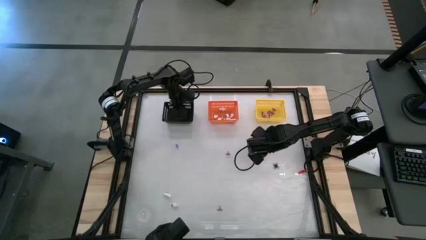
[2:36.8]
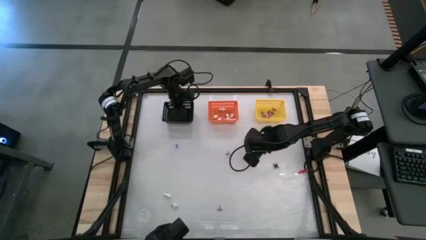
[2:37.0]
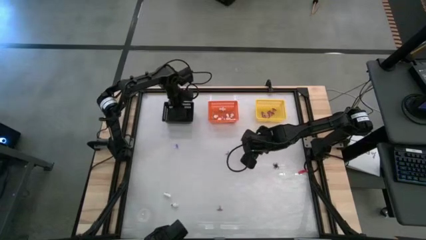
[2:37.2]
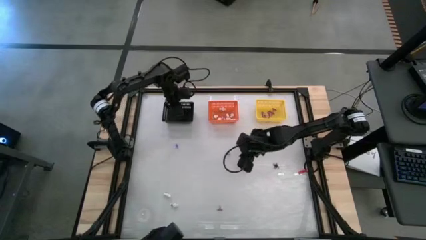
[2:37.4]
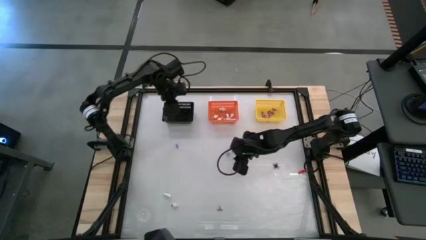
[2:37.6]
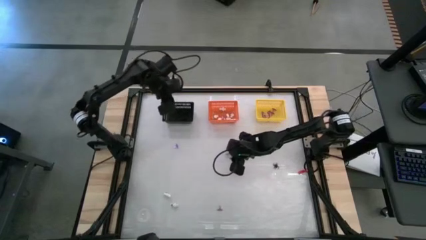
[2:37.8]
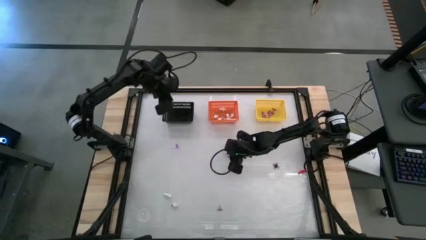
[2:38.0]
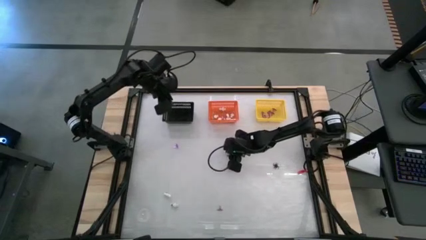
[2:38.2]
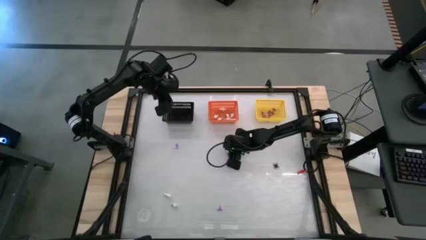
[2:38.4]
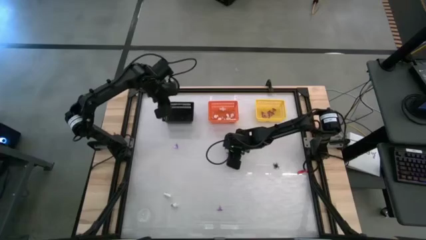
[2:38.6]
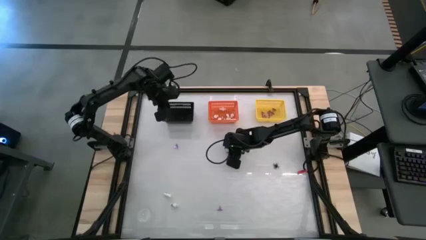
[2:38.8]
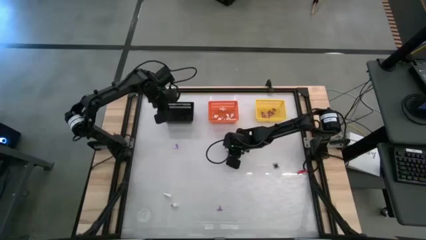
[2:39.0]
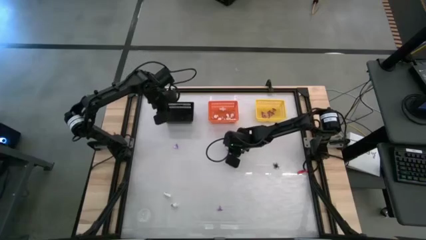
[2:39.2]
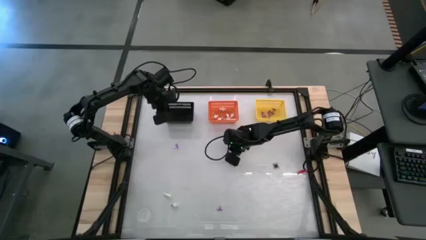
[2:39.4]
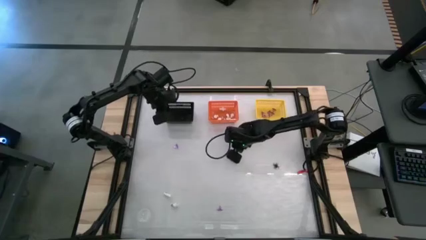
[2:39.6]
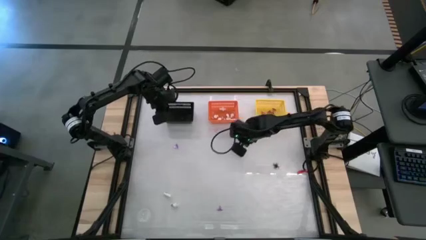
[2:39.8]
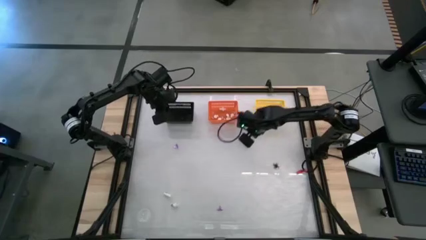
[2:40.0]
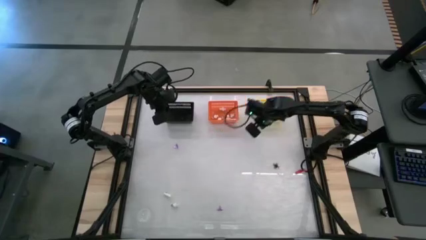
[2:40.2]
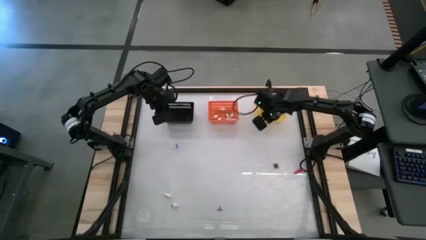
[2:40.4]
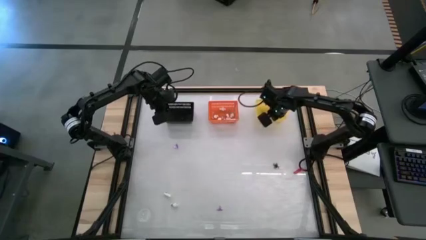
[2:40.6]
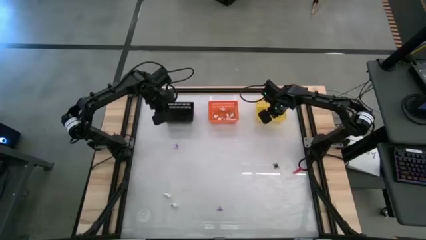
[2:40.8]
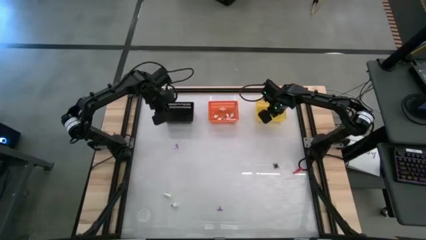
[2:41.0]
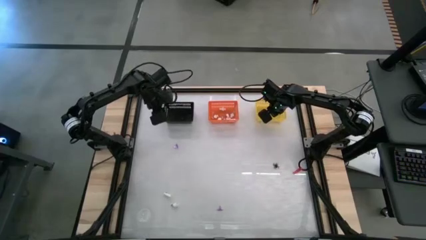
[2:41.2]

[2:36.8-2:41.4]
Task: Sort Halloween decoration
Put the top right witch hat toy into the yellow bin

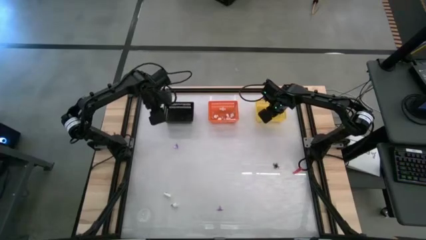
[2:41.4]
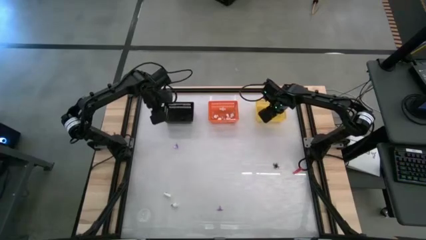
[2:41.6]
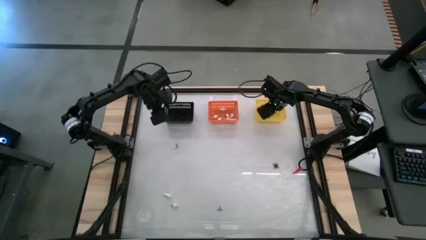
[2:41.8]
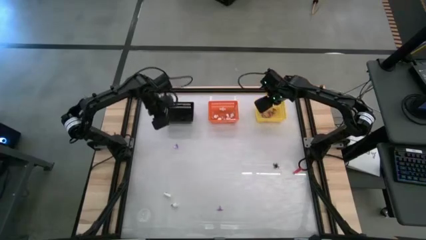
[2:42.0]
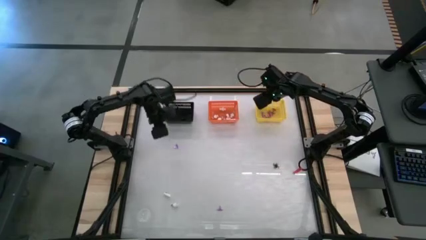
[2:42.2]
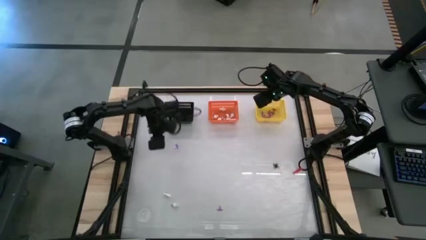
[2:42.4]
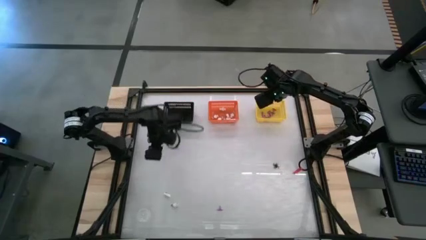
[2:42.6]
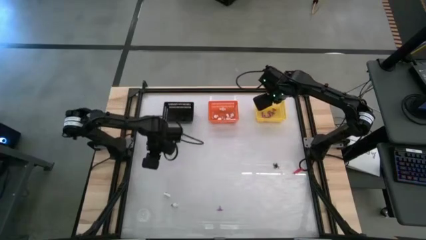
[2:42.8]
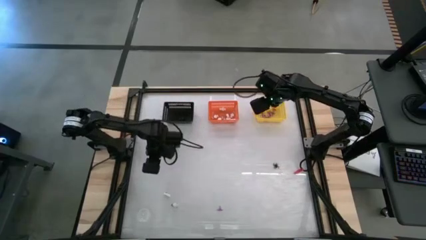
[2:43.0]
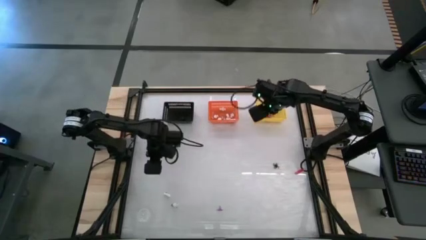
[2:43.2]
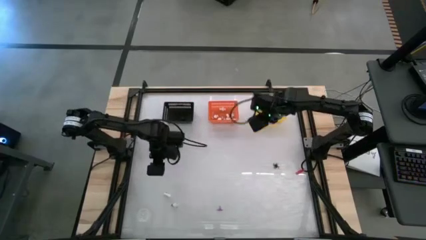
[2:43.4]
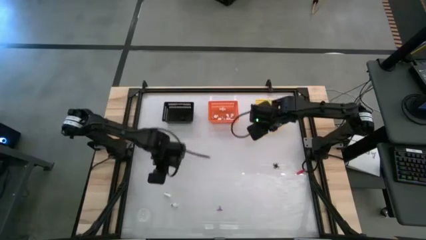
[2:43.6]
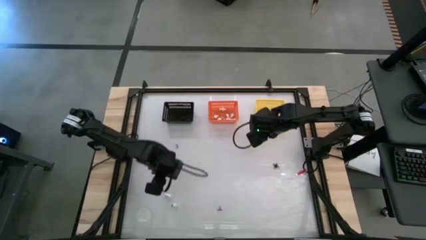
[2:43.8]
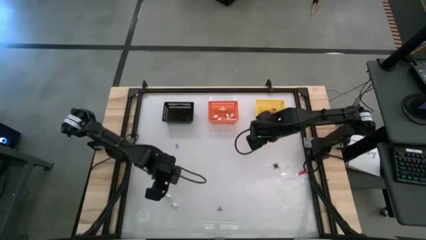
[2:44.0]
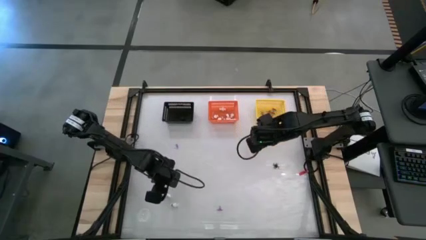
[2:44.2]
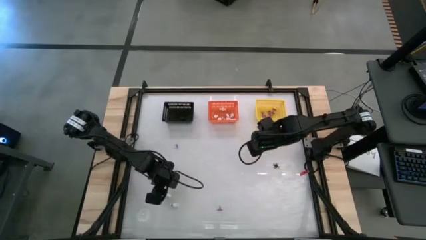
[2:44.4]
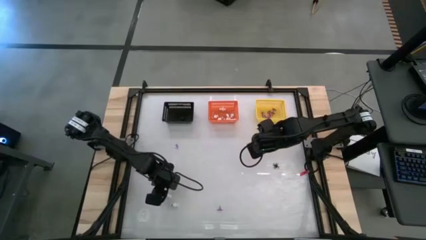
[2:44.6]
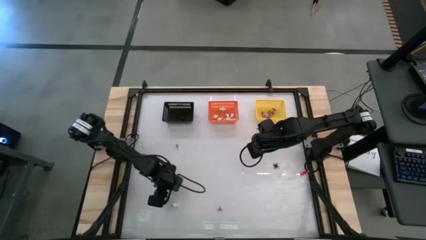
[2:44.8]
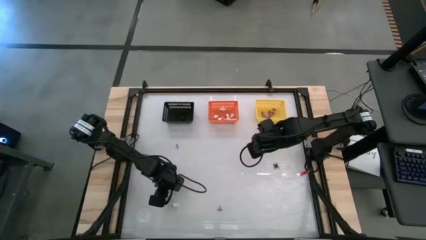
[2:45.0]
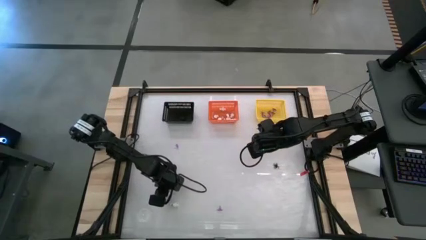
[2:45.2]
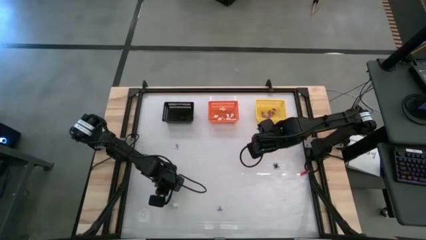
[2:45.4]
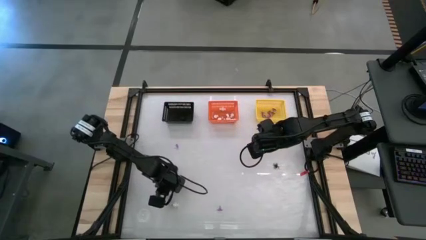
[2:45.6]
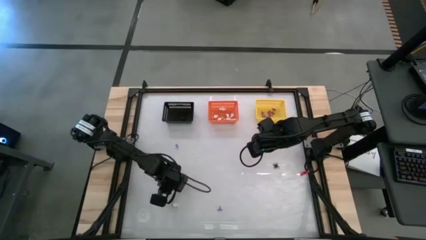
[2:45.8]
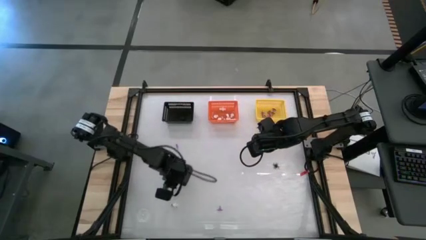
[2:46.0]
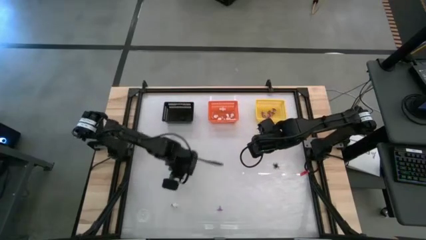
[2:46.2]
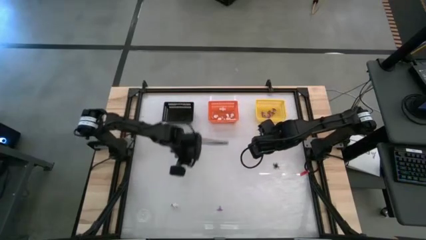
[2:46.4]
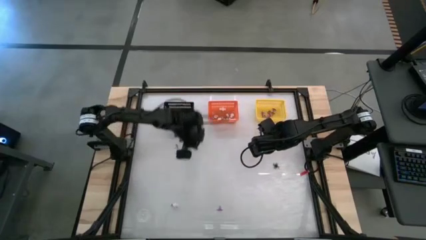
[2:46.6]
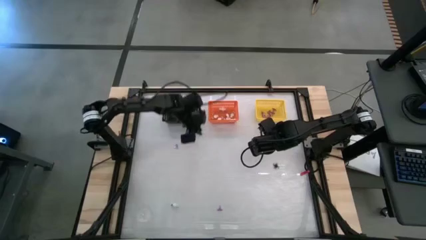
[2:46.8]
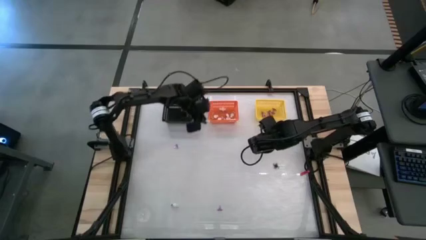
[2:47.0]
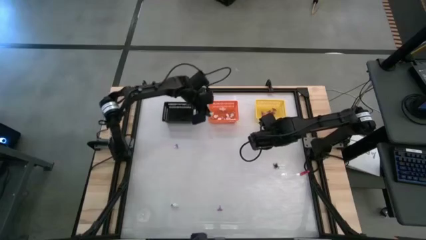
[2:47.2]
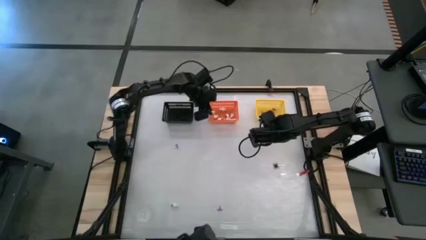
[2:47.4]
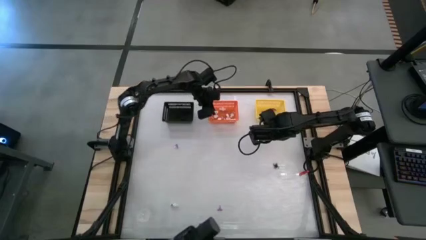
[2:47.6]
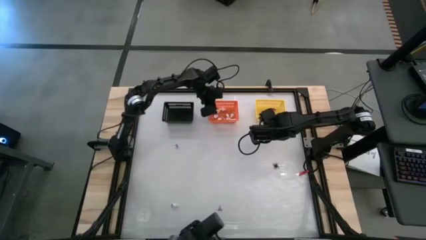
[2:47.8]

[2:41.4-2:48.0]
Put the top skeleton toy into the orange bin
